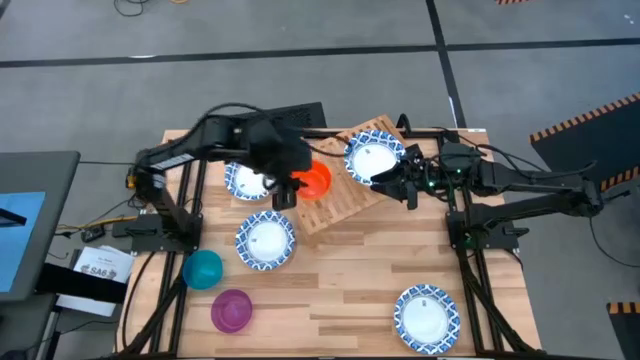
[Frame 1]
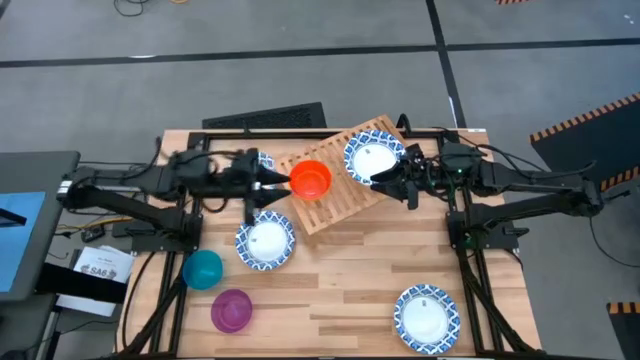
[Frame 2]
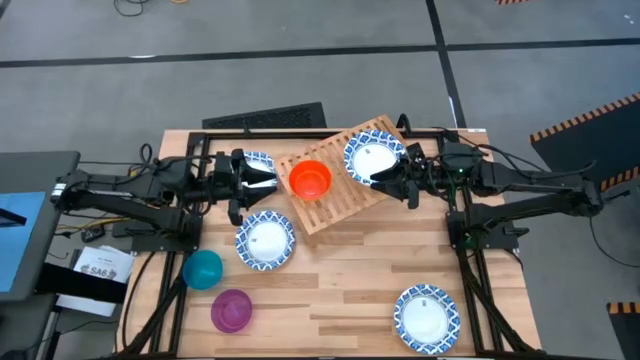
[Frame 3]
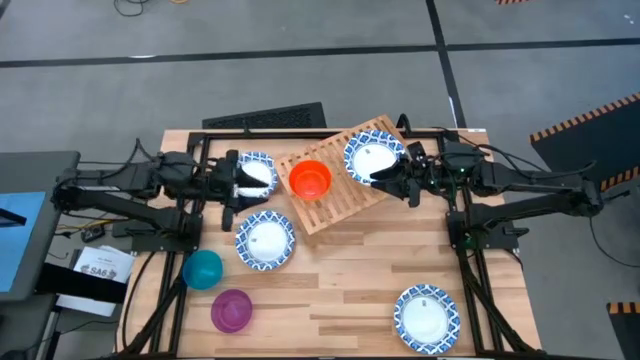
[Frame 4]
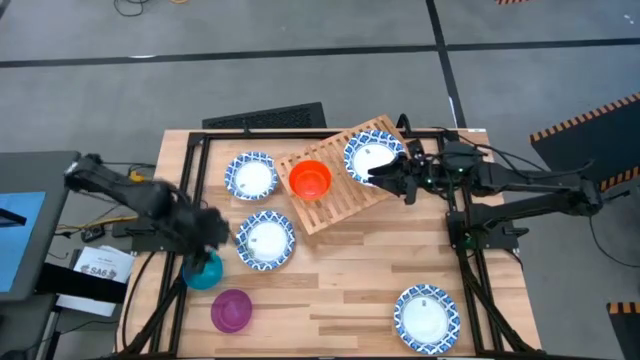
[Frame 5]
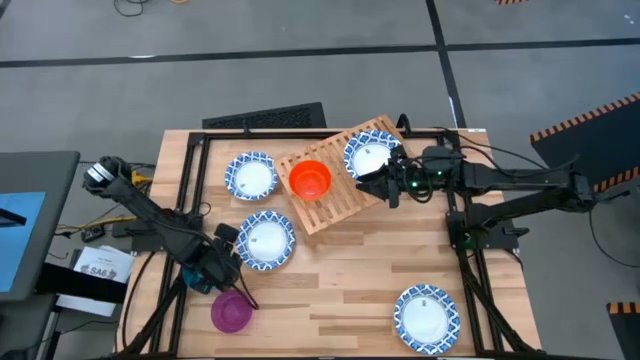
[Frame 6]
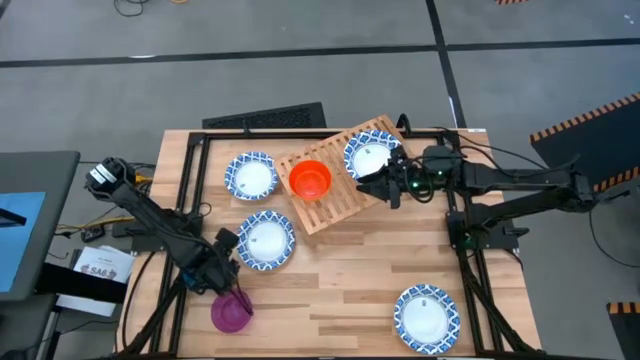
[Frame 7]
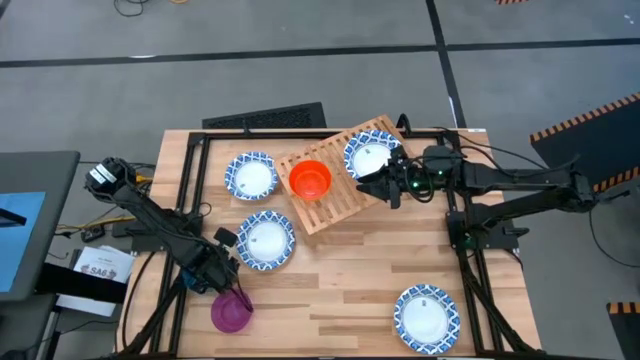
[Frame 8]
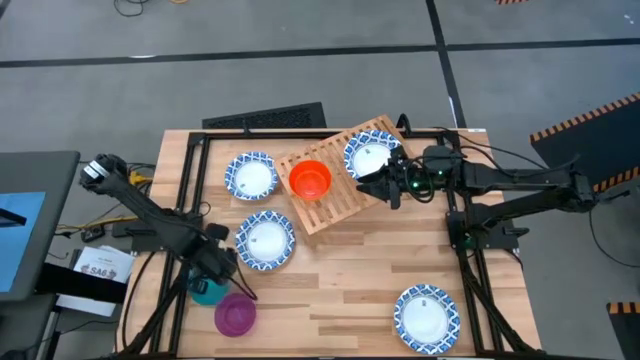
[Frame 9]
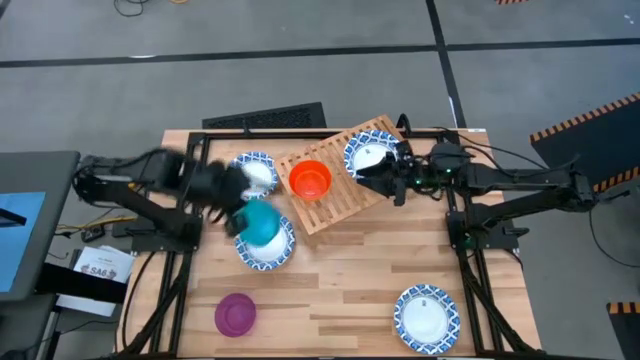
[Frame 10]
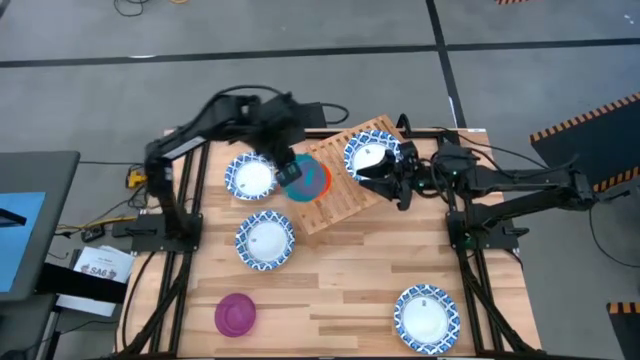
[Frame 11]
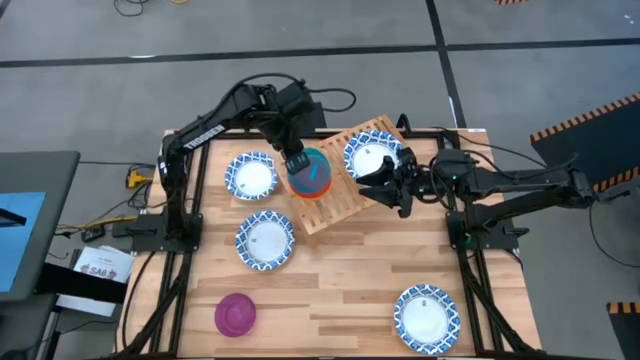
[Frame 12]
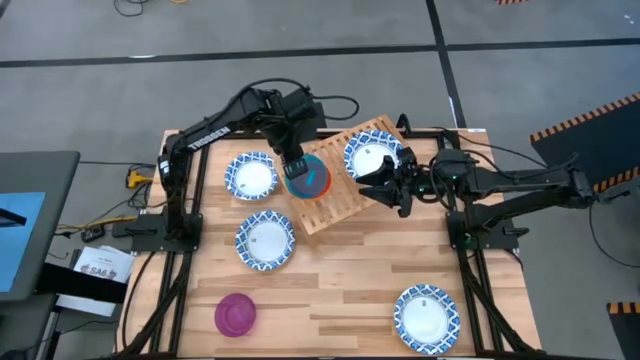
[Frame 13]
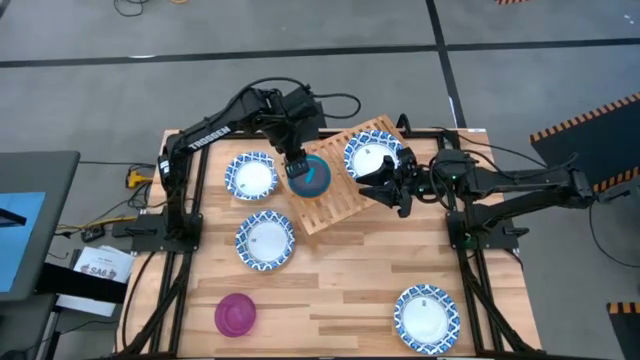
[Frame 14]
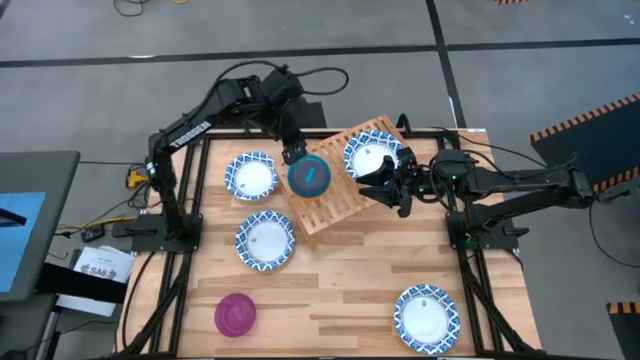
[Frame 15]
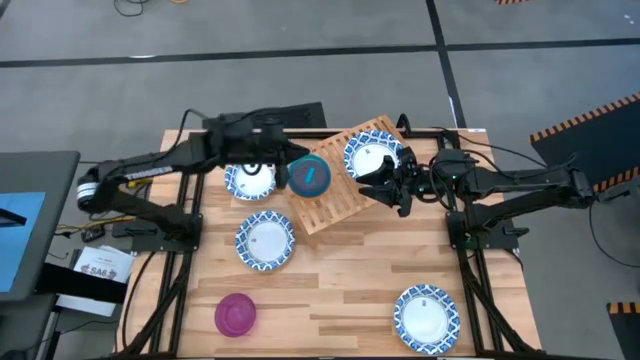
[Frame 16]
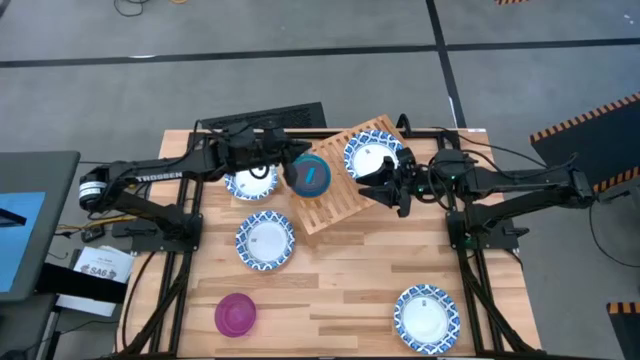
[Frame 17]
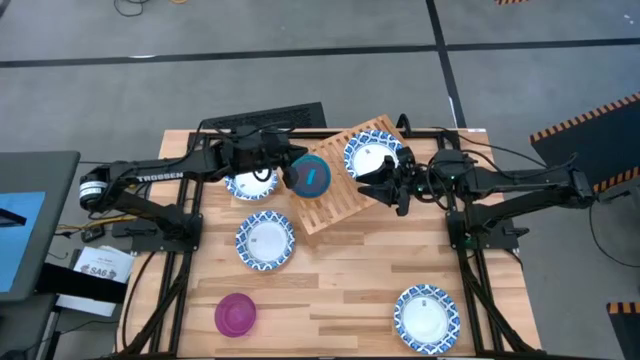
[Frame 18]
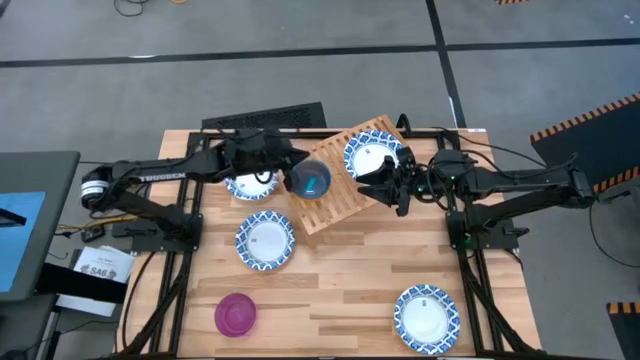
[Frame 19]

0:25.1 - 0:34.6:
Task: Place and stack bowls onto a shelf
Stack the blue bowl on top of the orange bowl on the shelf

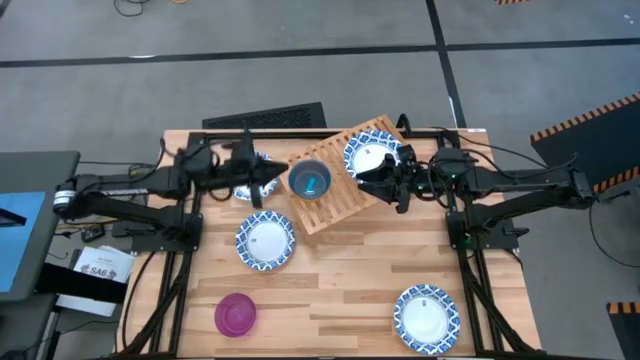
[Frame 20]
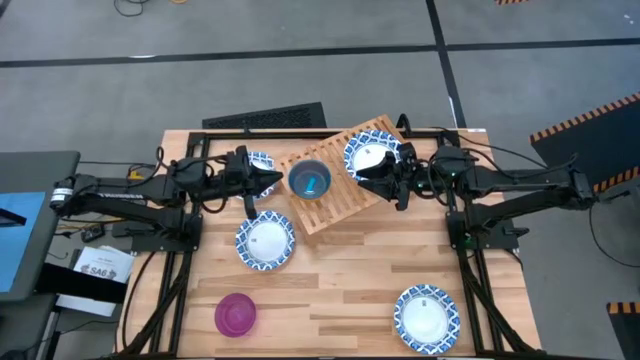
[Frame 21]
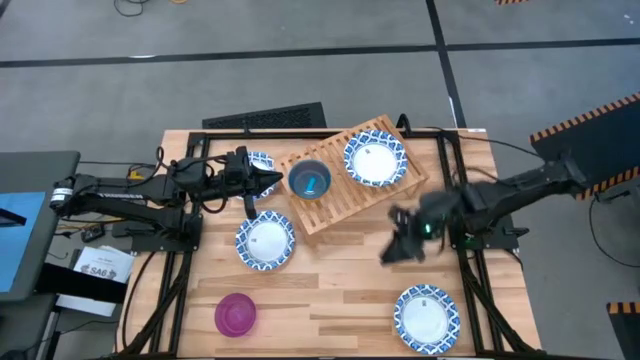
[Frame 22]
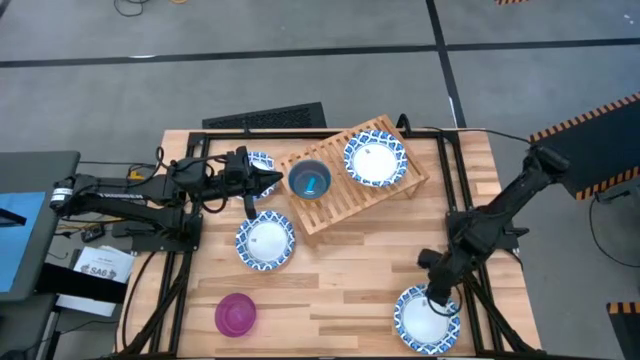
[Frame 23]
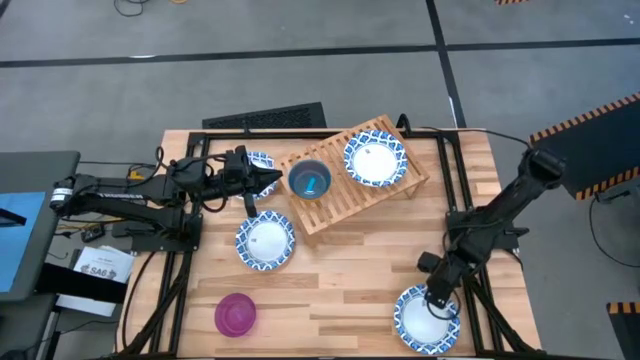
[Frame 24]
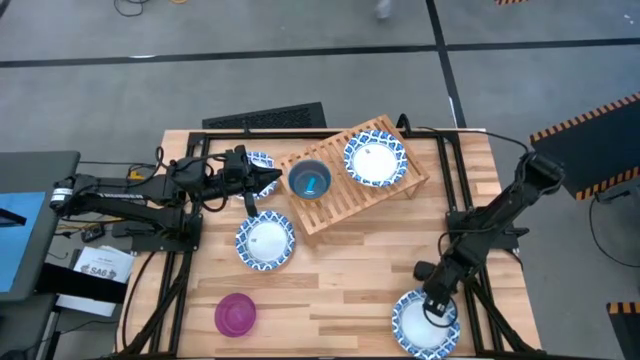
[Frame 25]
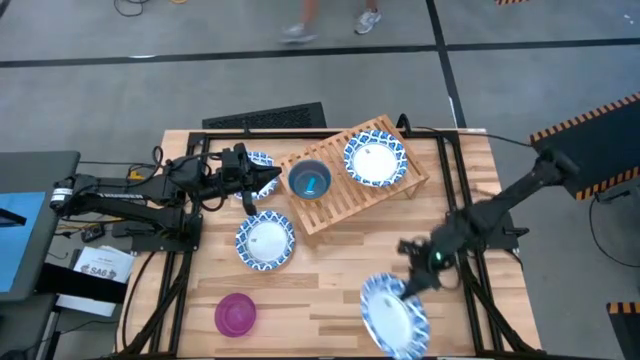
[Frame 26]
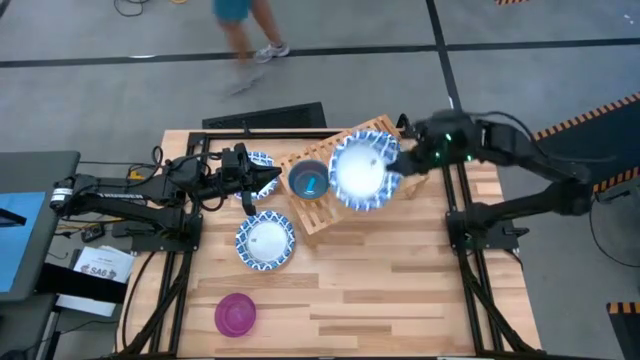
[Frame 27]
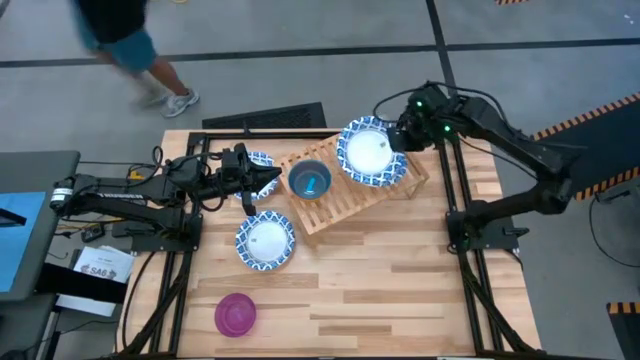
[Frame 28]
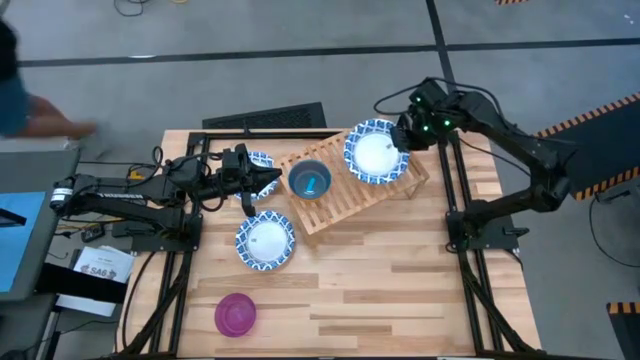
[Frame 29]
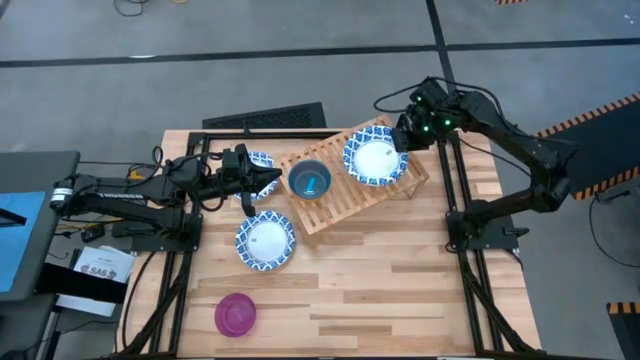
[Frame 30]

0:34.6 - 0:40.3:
Stack the bottom right white patterned bowl on top of the white patterned bowl on the shelf

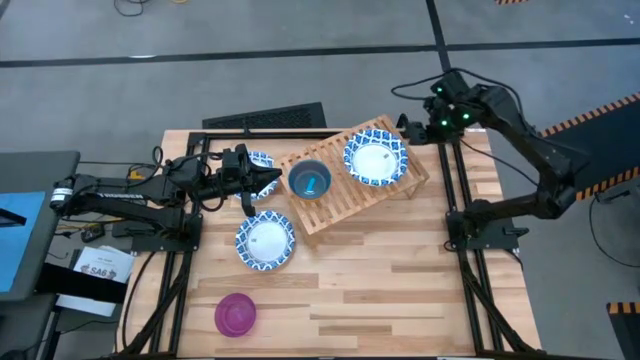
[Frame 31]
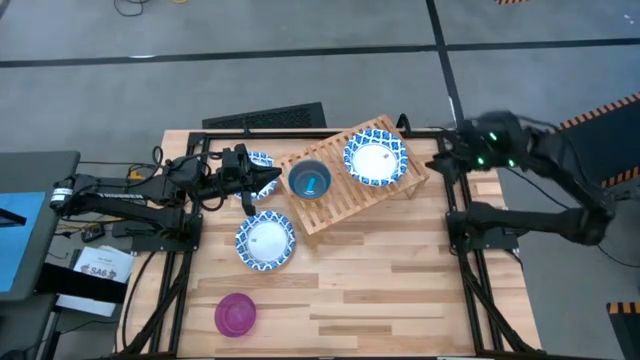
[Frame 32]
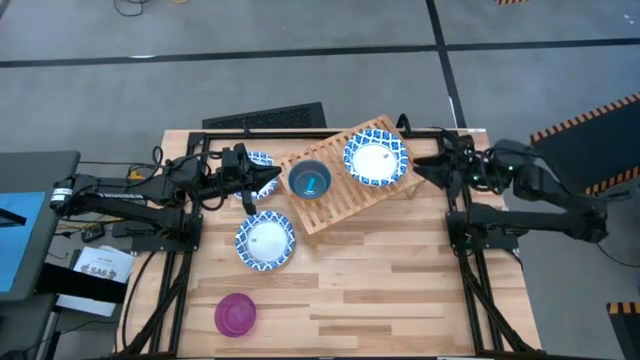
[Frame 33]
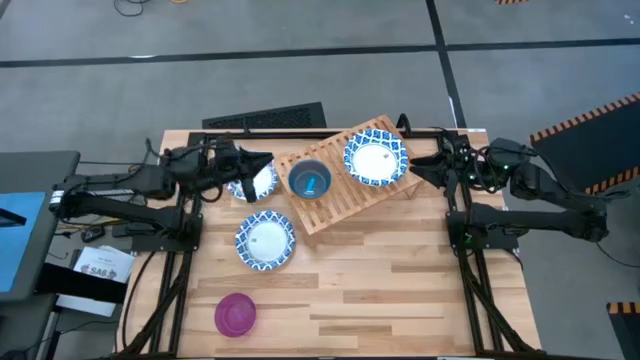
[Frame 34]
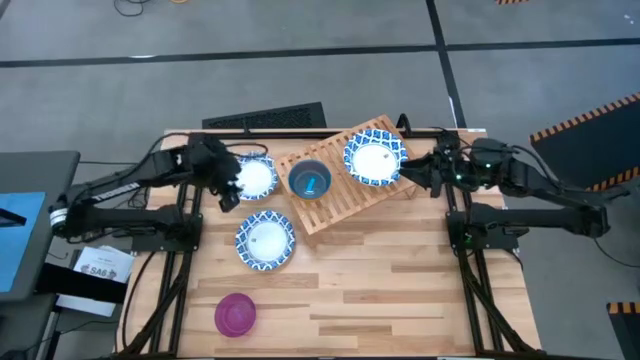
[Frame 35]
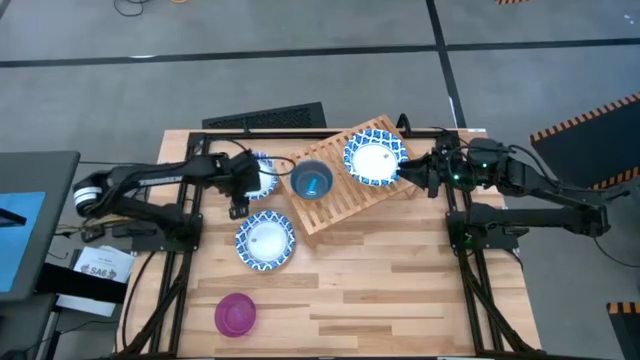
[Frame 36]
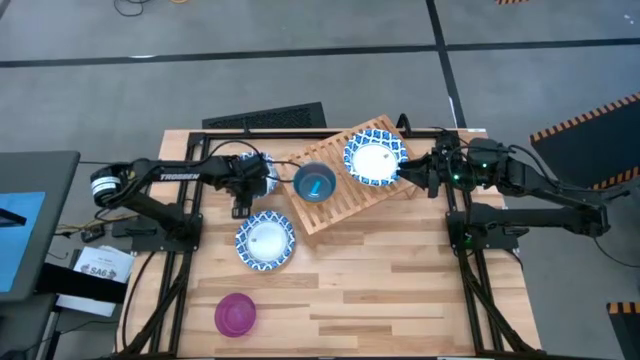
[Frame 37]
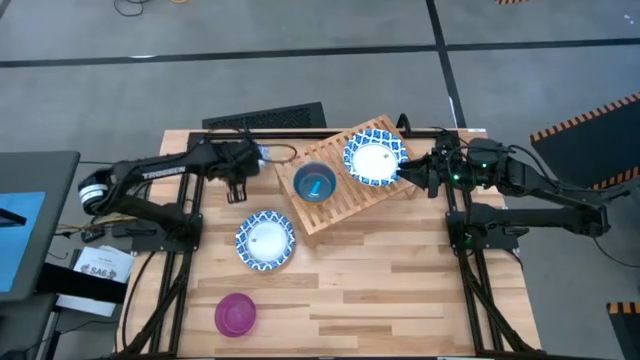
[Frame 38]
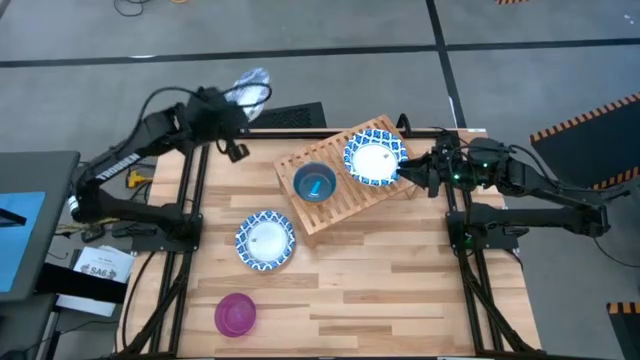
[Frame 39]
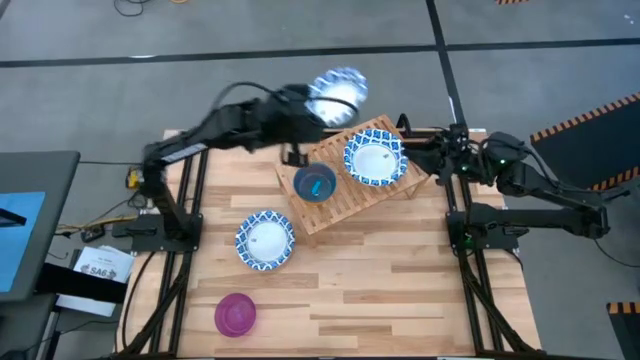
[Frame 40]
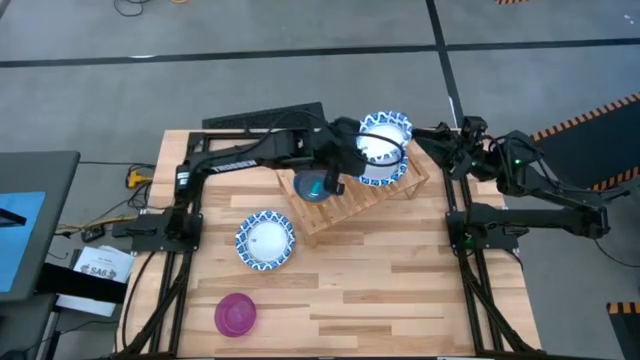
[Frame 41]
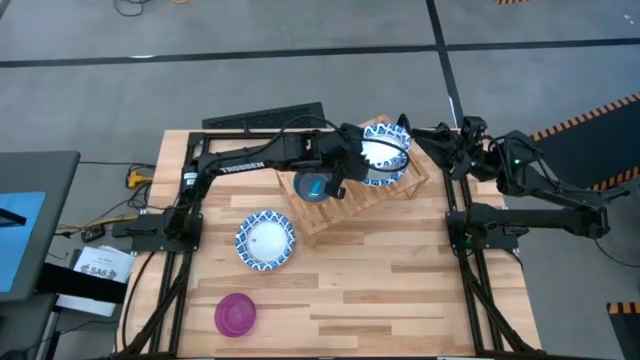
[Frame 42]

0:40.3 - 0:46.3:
Stack the top white patterned bowl on top of the white patterned bowl on the shelf
